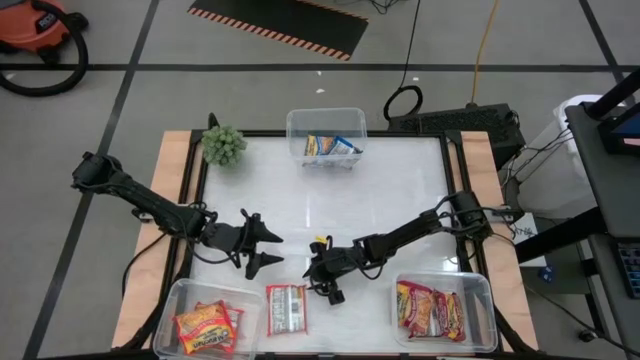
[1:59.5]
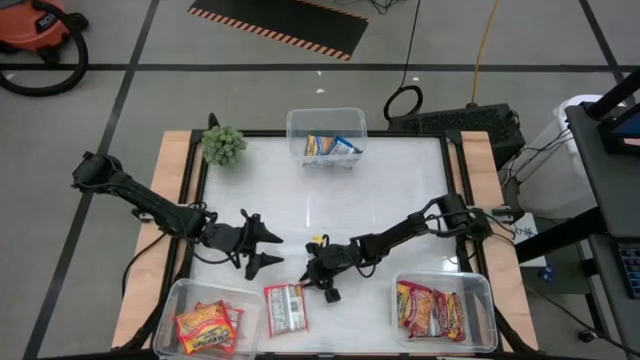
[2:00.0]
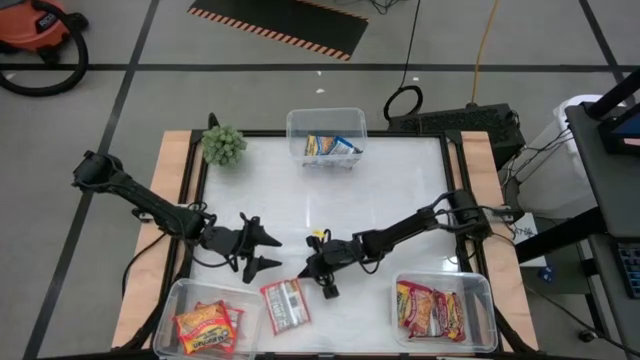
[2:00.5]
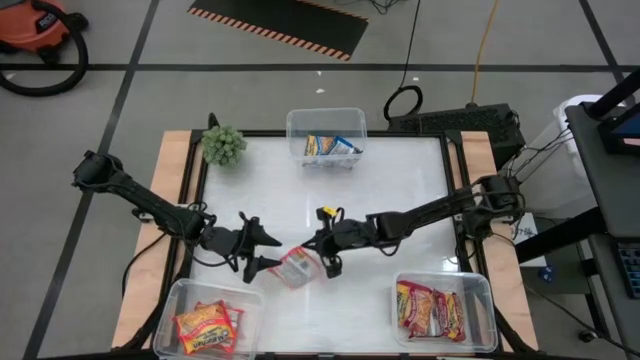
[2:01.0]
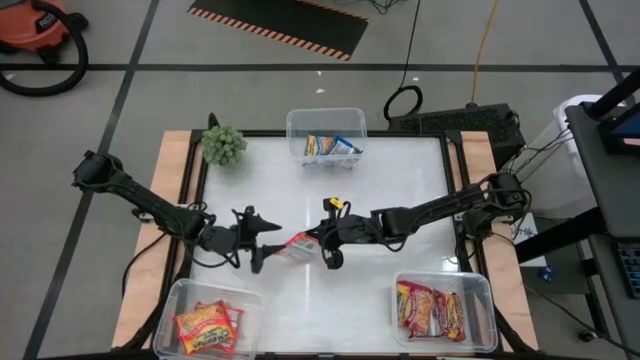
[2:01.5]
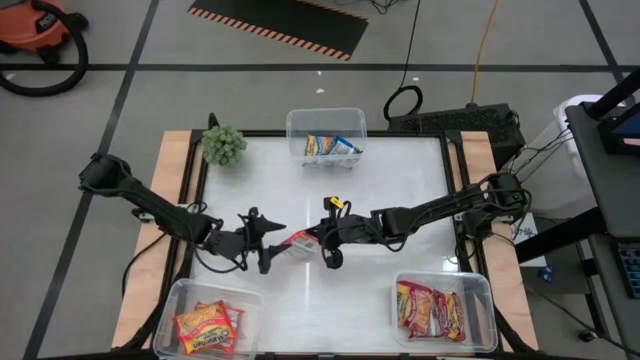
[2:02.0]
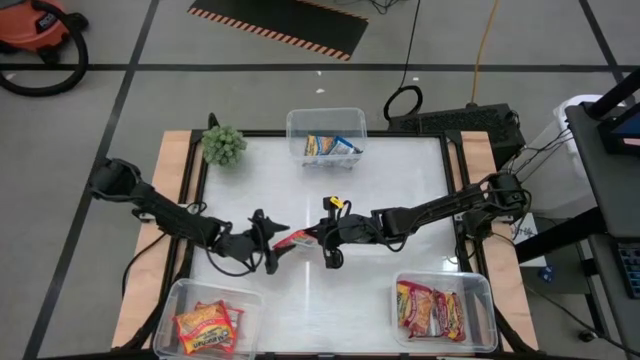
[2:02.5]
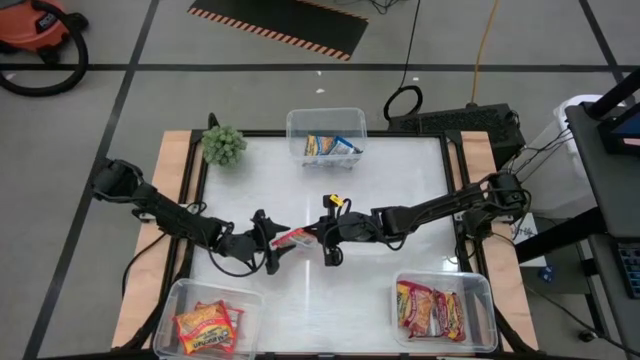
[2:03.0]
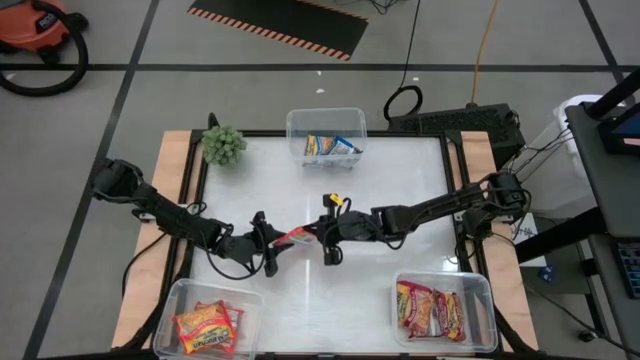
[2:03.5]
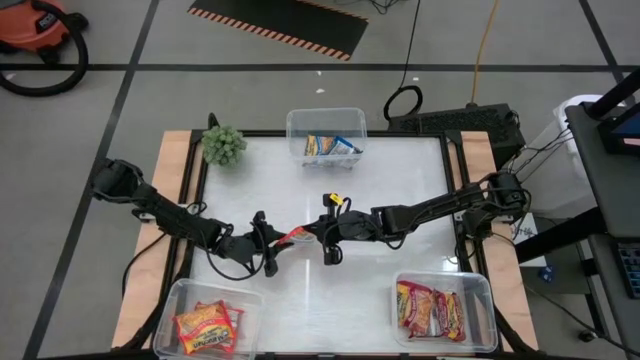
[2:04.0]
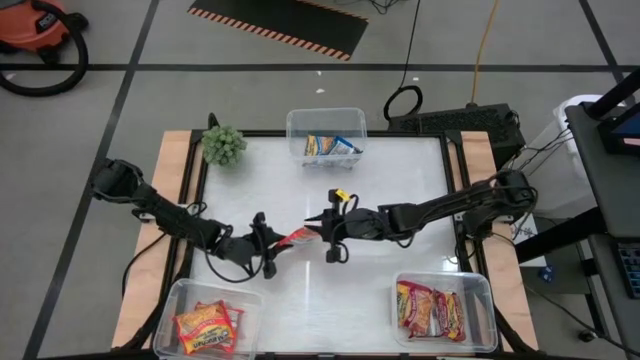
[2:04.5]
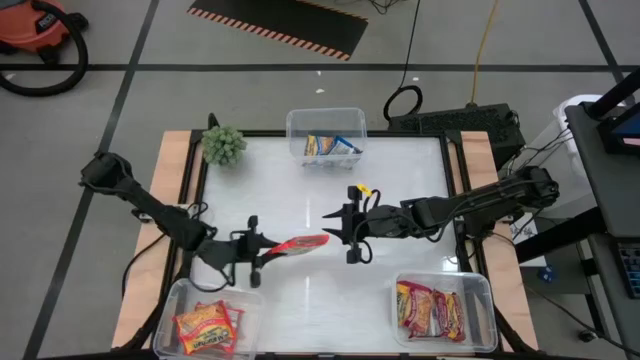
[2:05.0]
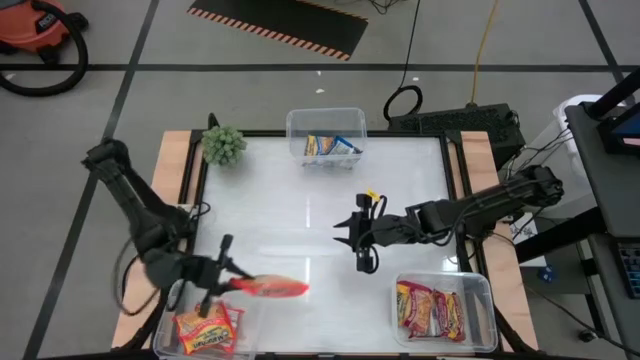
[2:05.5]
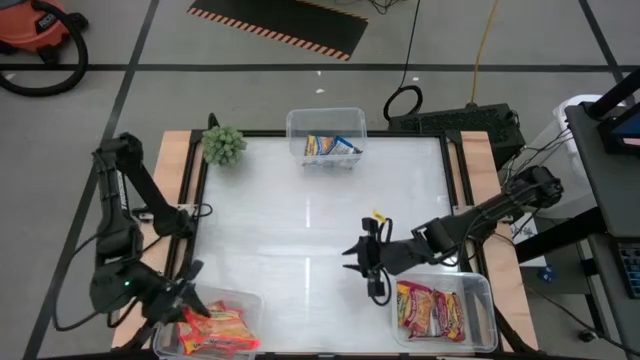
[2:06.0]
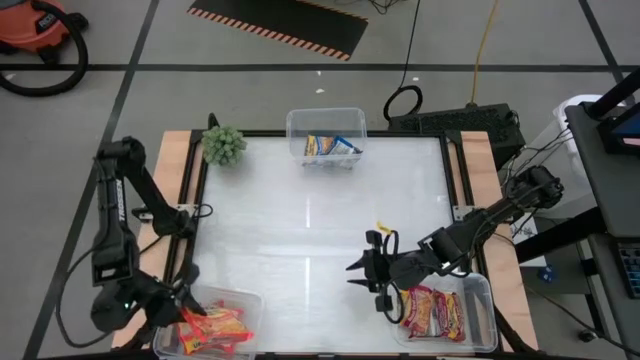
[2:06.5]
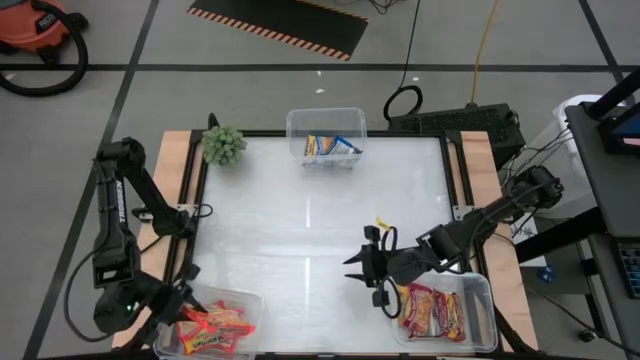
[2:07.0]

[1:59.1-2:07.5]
Task: Sort Maruchan noodles
Put the orange noodle pack into the left transparent bin

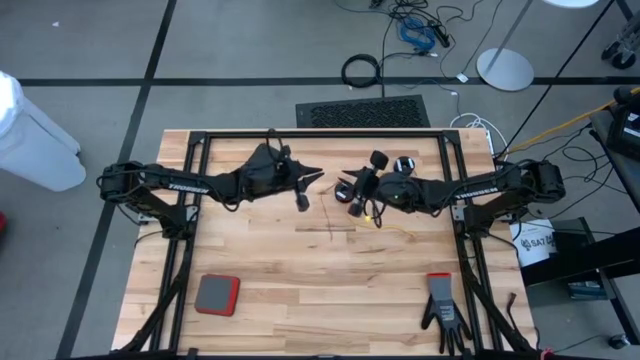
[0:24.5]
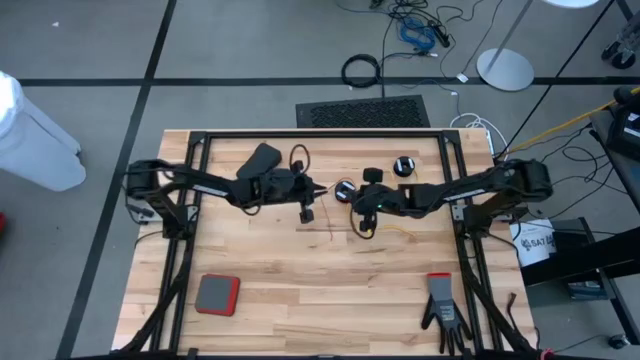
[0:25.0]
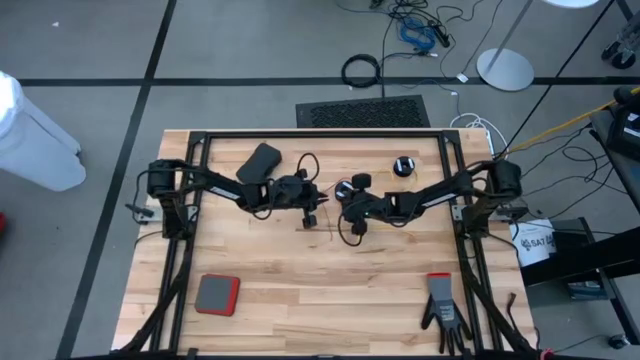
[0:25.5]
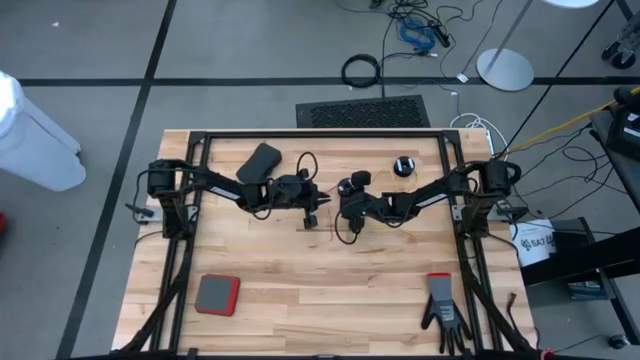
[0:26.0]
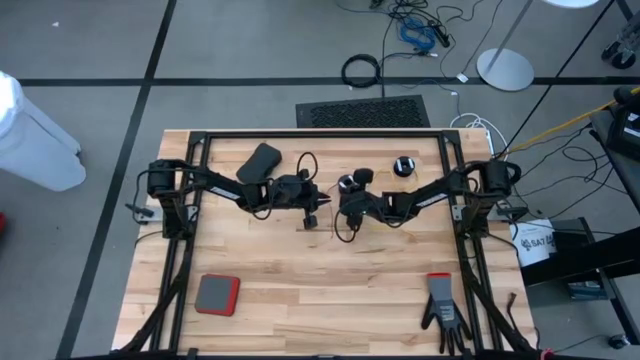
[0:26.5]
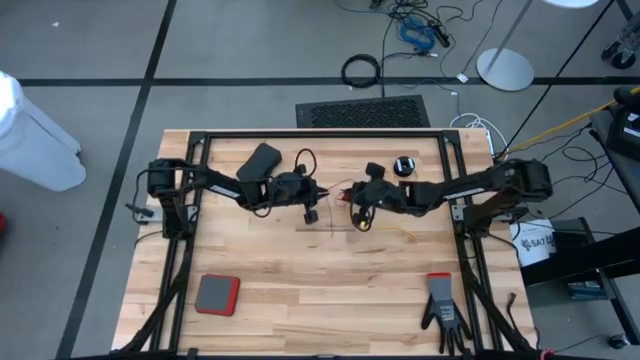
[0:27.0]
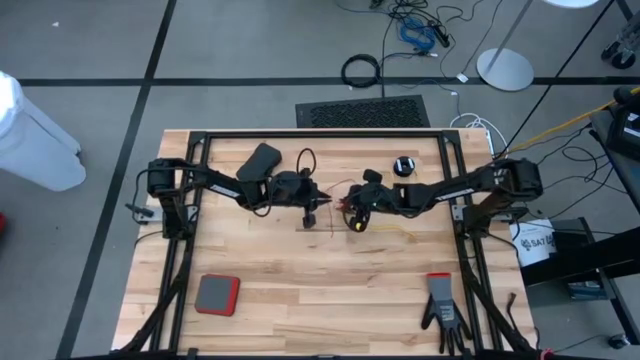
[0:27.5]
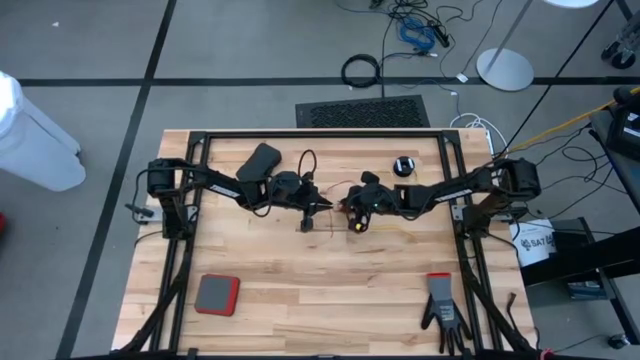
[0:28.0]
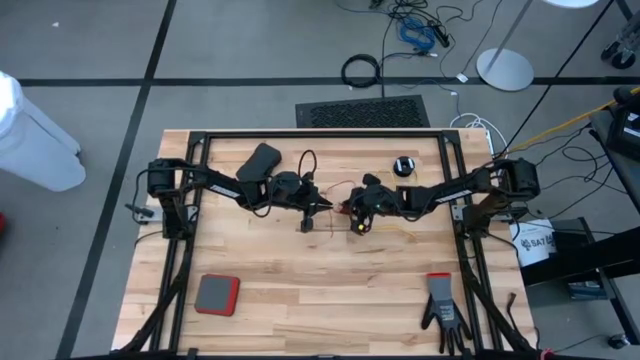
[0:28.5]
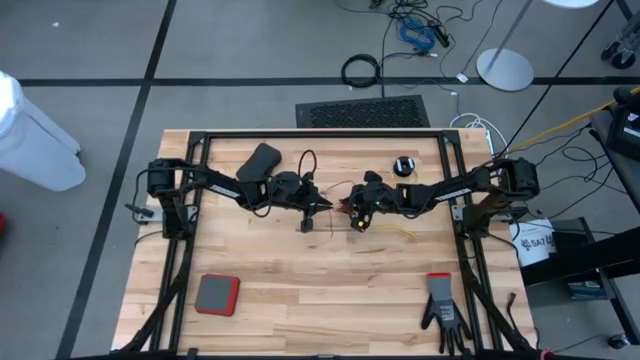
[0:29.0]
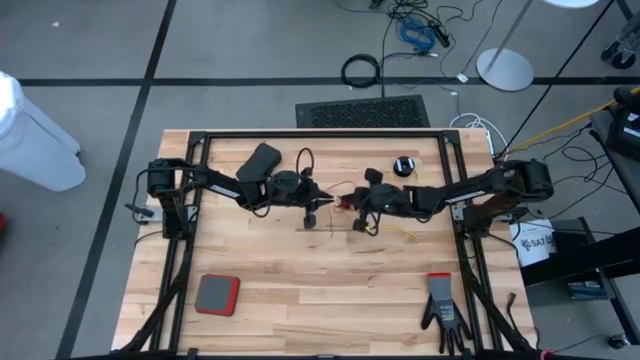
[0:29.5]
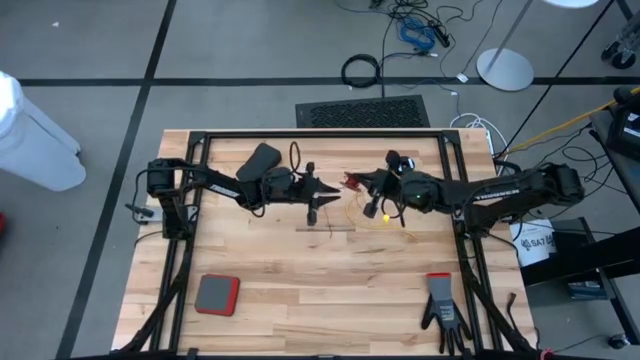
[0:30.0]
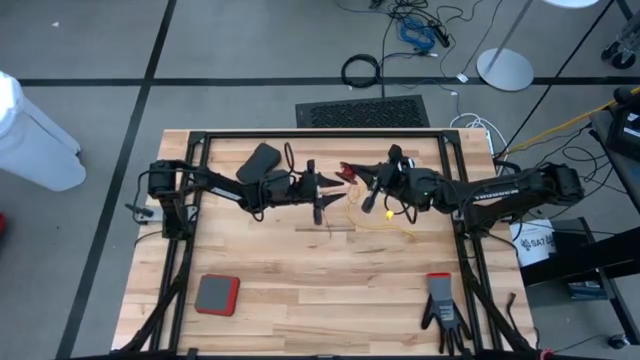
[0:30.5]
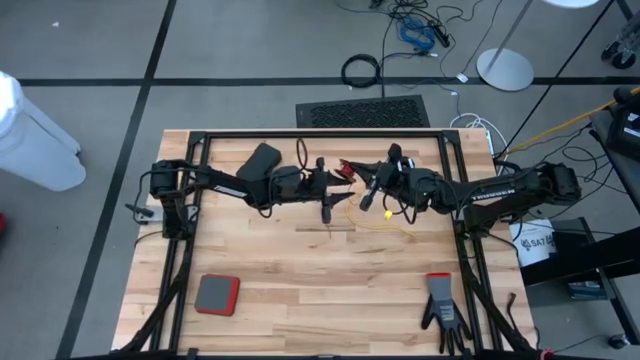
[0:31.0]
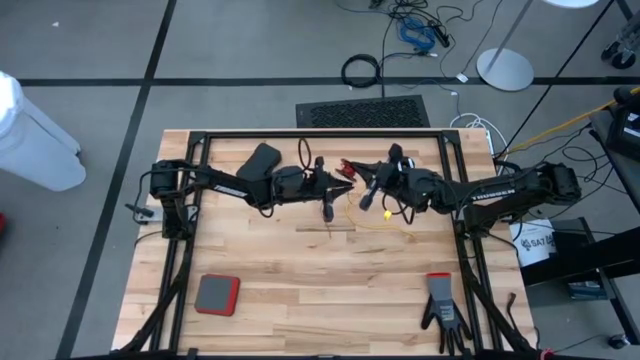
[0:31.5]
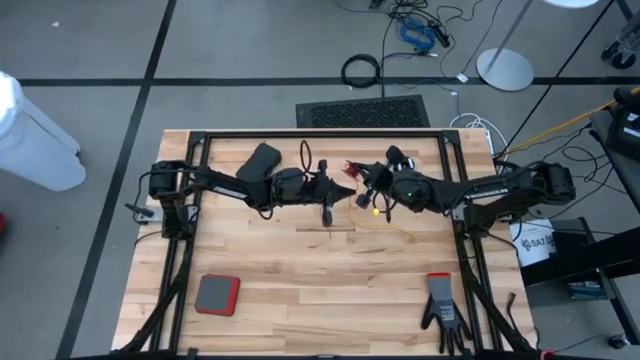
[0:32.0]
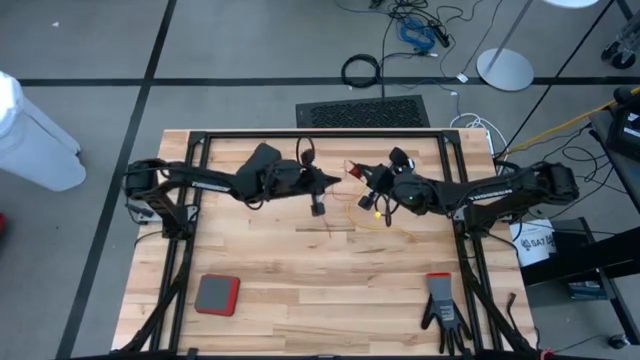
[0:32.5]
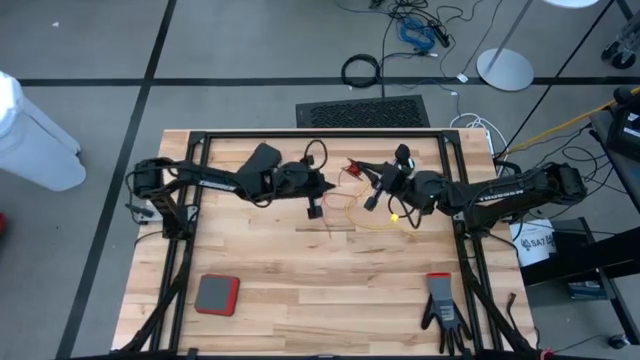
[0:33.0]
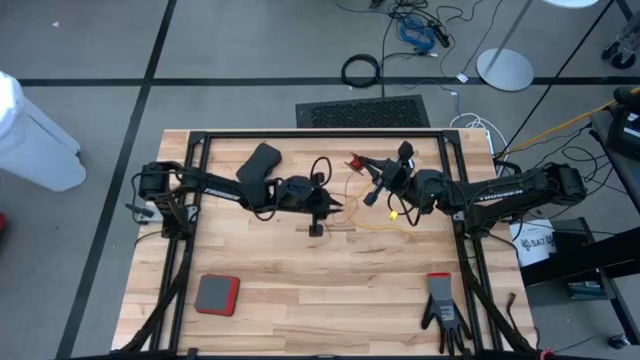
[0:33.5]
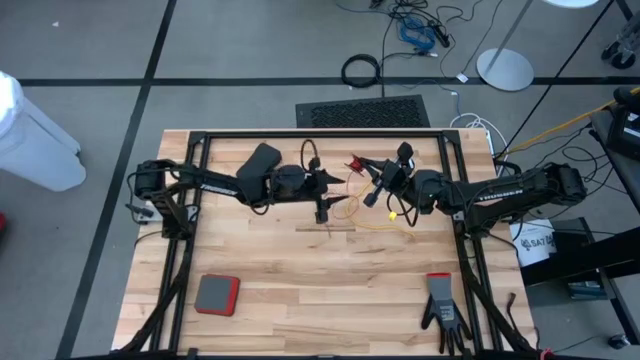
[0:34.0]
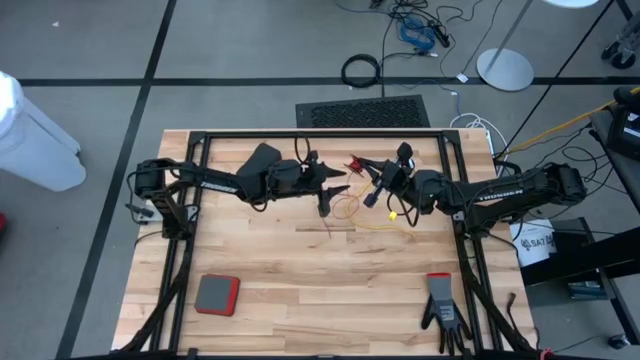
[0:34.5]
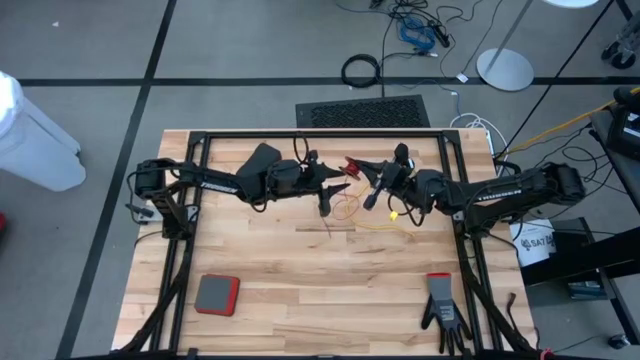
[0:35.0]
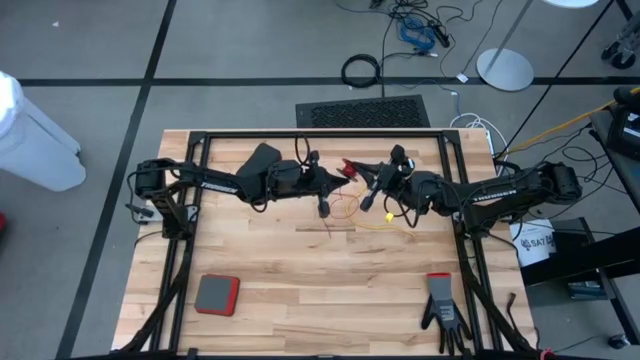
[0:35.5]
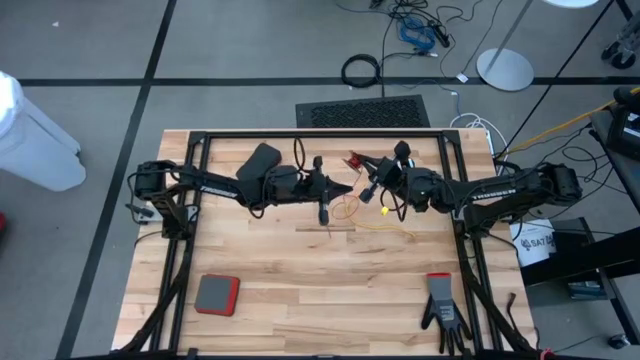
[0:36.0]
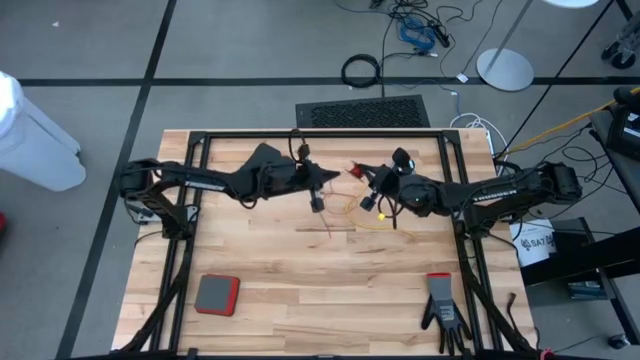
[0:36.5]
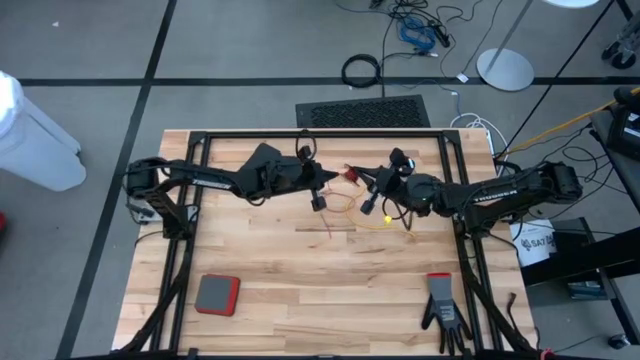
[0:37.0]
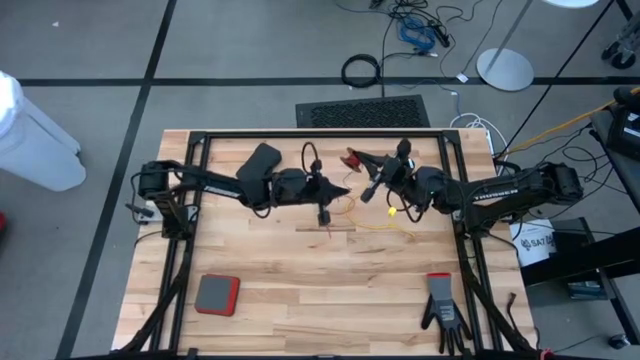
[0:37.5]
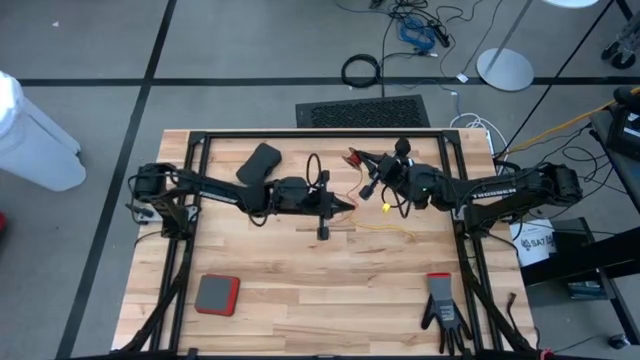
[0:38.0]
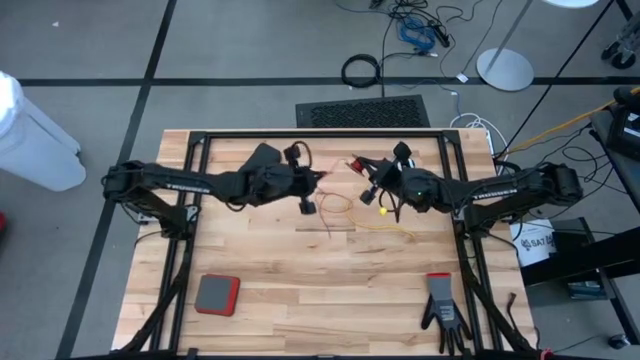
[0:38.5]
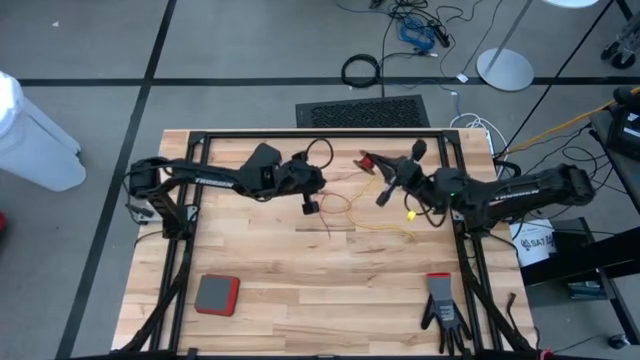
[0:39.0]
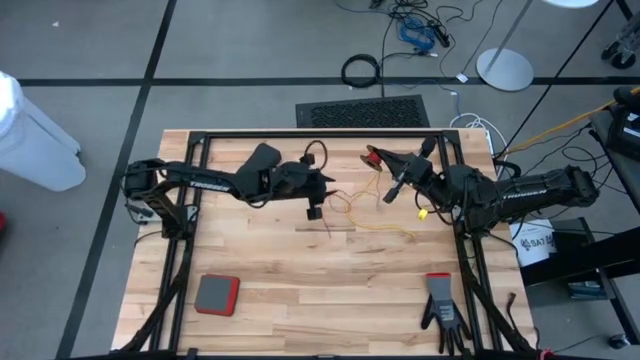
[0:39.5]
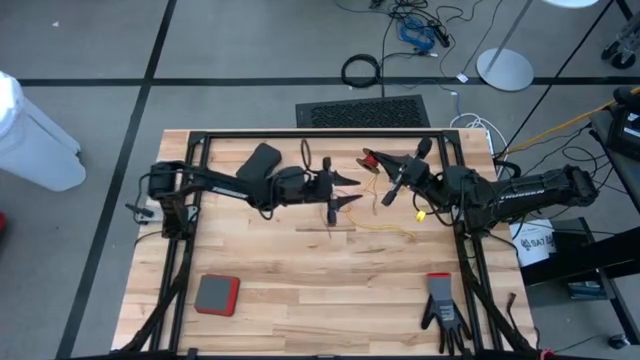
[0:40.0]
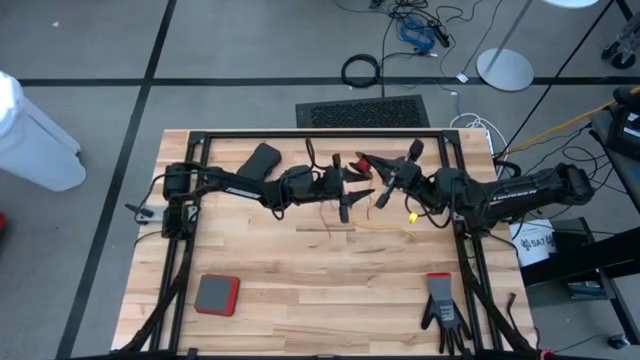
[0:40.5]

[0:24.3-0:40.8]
Task: Coil cords
Uncoil the red wire from the spool
